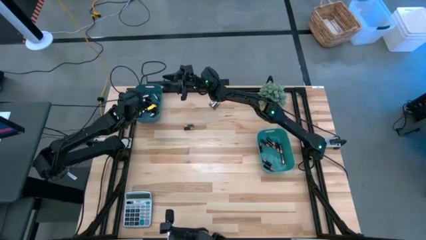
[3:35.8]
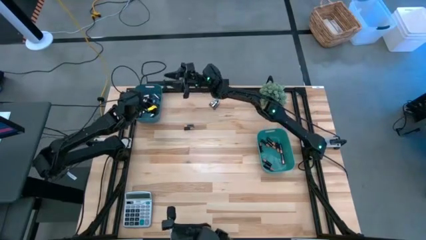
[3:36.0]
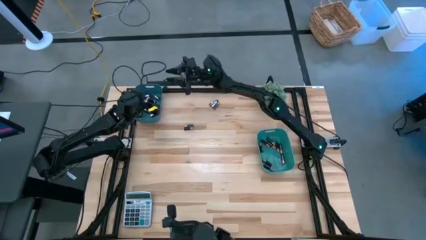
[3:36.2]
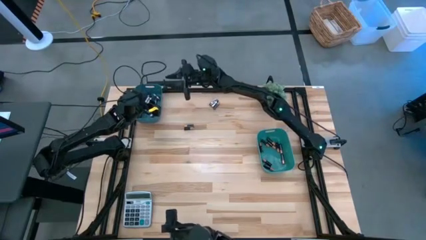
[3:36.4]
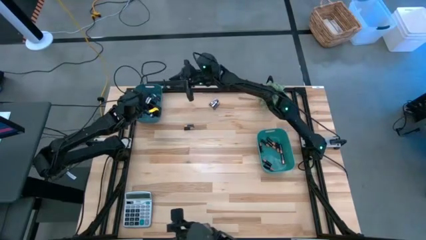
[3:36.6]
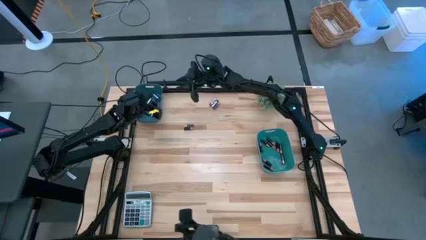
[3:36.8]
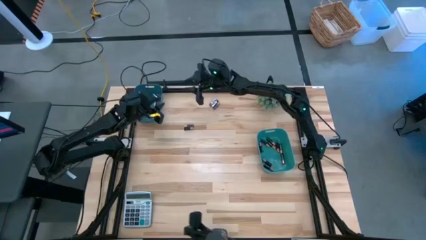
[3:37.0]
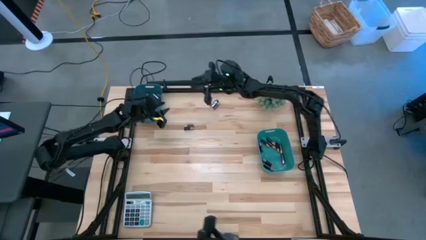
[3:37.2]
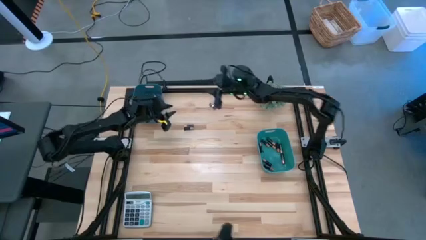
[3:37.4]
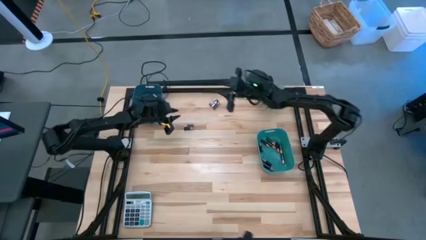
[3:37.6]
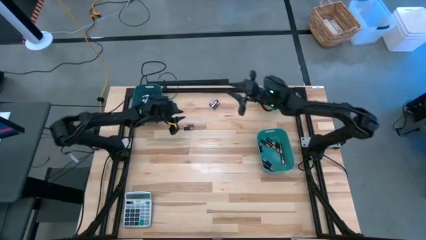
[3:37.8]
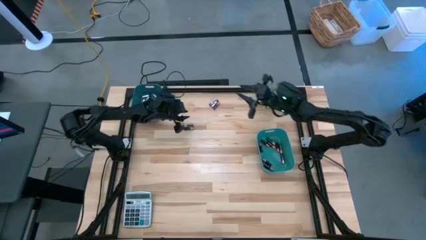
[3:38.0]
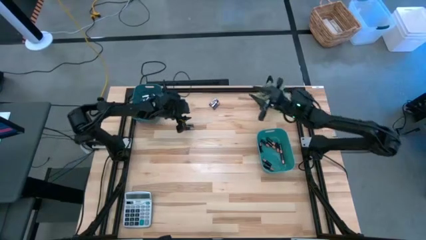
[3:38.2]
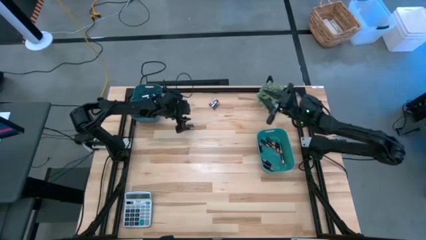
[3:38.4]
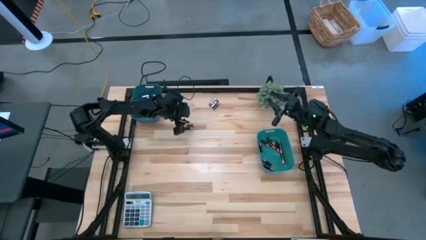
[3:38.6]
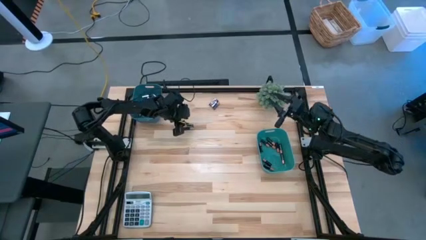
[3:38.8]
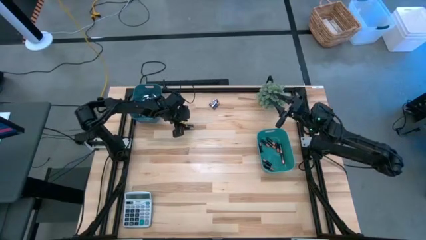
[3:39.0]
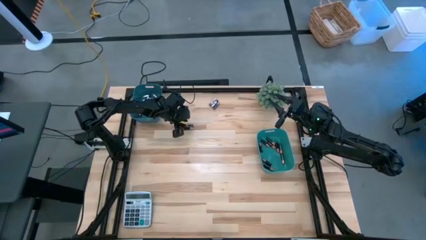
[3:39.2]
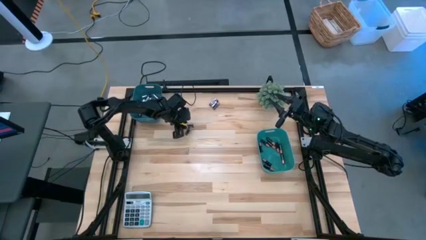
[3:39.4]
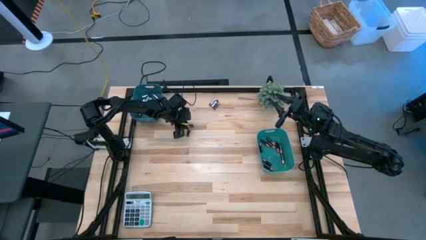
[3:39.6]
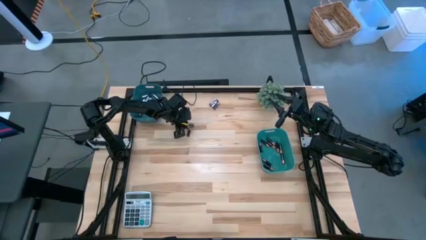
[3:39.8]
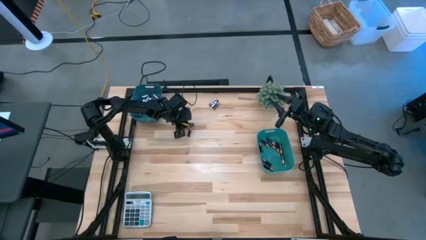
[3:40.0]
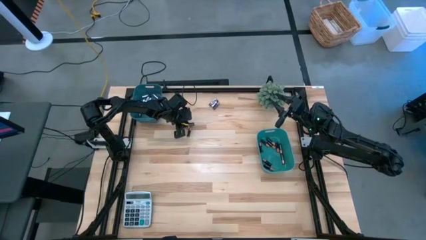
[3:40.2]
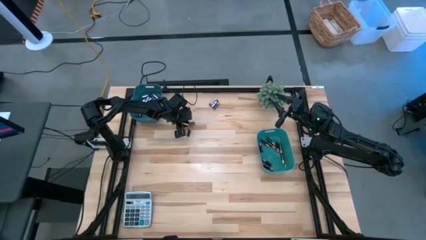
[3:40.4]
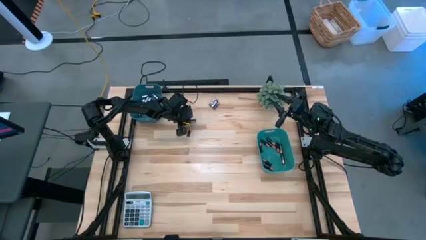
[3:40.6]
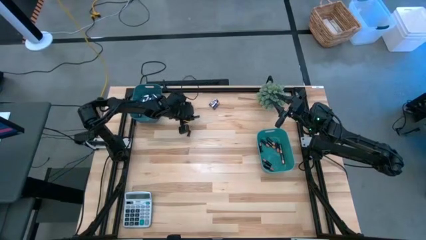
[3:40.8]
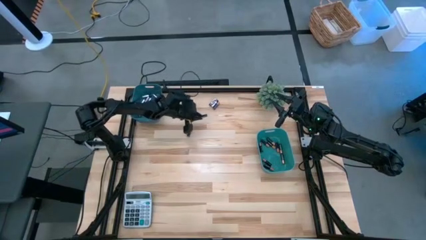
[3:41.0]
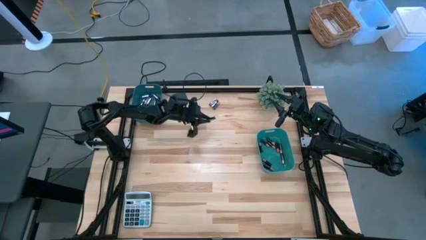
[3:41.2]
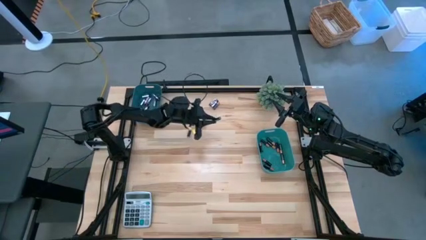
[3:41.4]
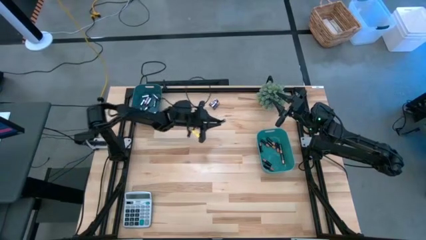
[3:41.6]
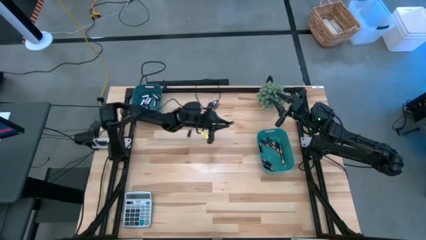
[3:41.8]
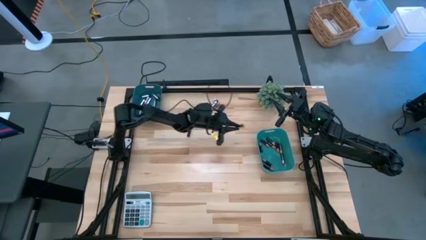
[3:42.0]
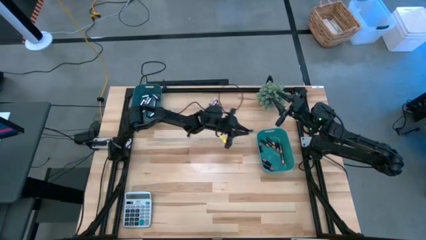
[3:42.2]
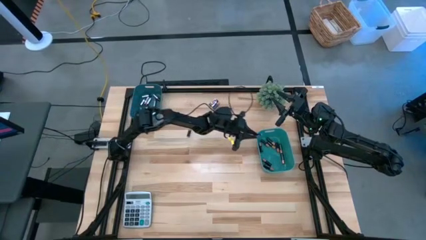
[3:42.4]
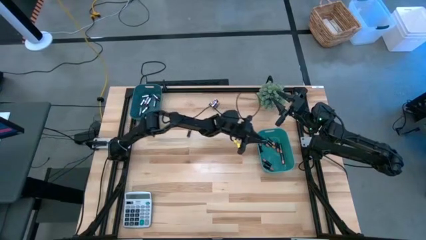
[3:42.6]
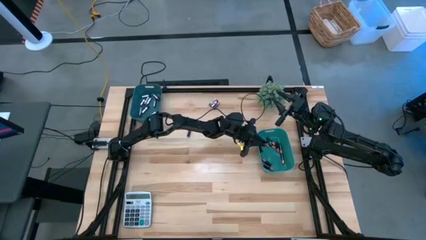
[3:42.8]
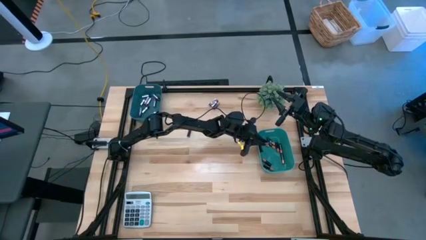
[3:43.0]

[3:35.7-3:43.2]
Task: Sort batteries
Put the brown-block battery into the green bin

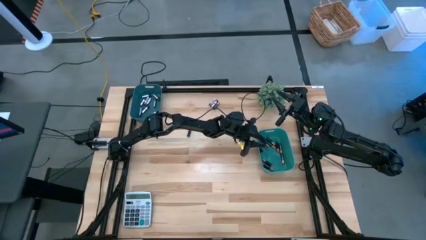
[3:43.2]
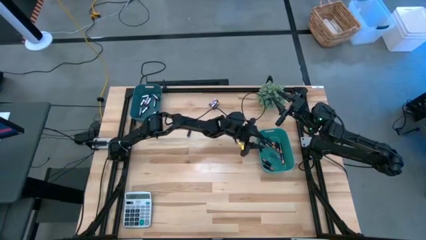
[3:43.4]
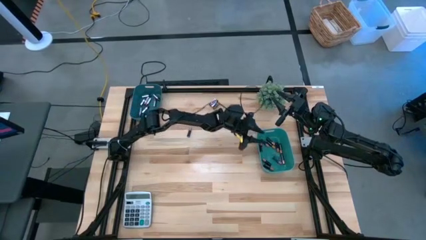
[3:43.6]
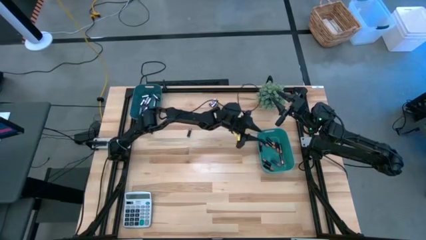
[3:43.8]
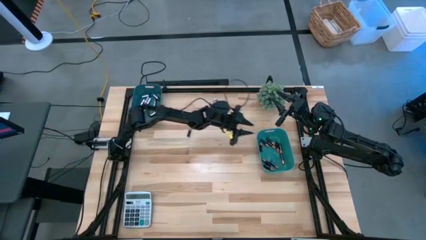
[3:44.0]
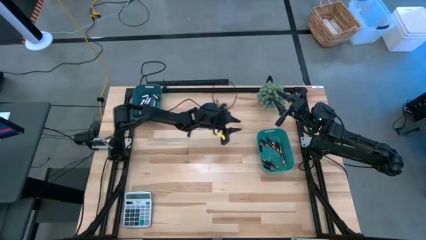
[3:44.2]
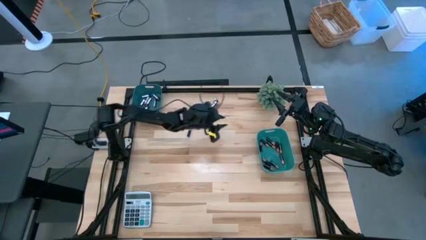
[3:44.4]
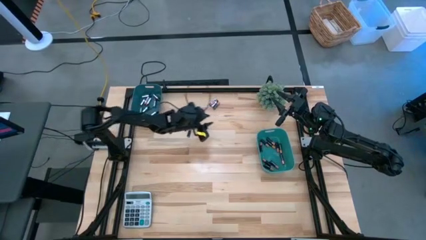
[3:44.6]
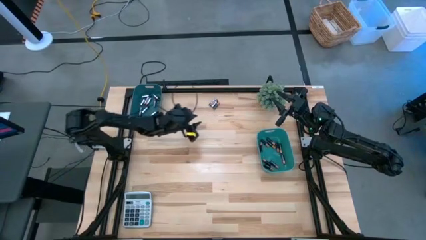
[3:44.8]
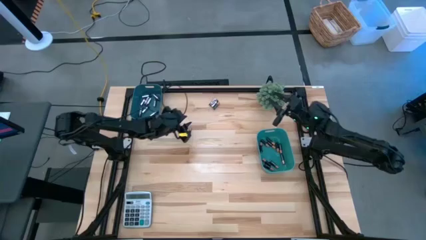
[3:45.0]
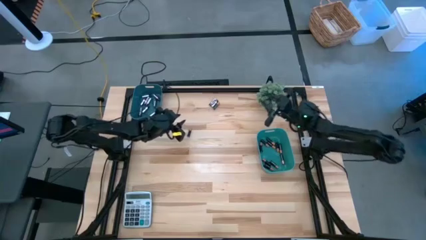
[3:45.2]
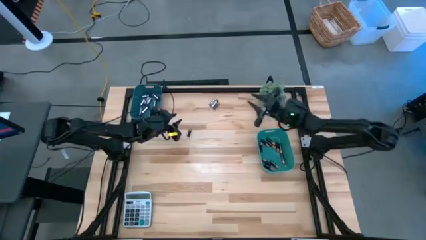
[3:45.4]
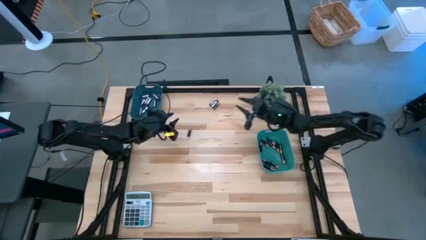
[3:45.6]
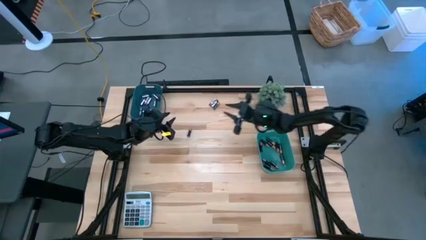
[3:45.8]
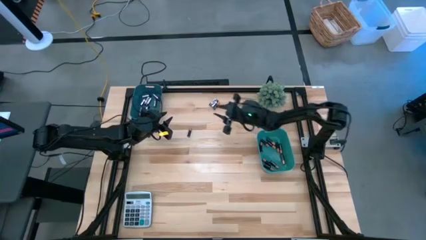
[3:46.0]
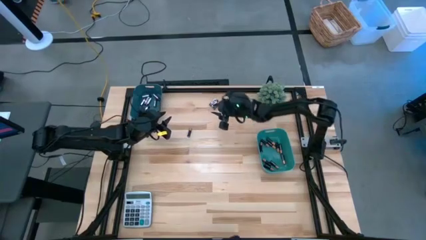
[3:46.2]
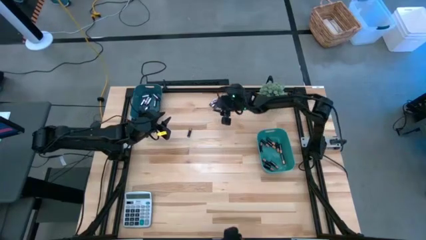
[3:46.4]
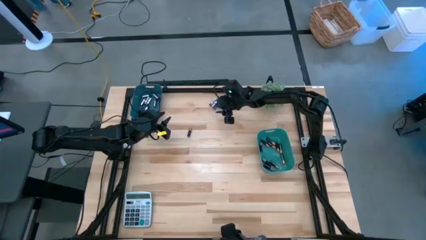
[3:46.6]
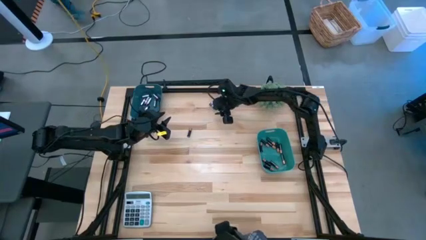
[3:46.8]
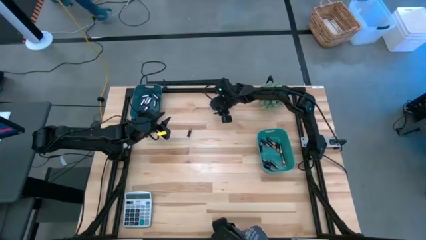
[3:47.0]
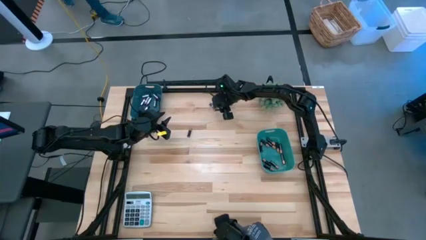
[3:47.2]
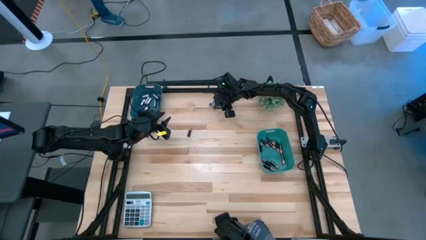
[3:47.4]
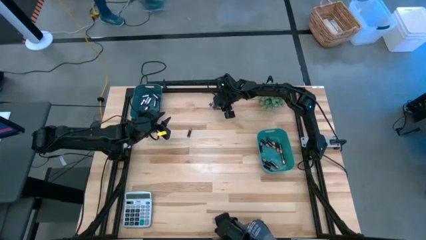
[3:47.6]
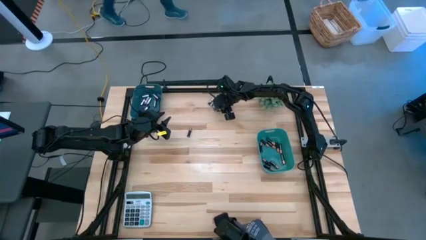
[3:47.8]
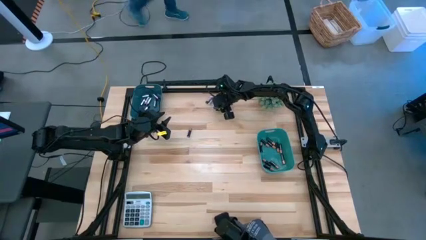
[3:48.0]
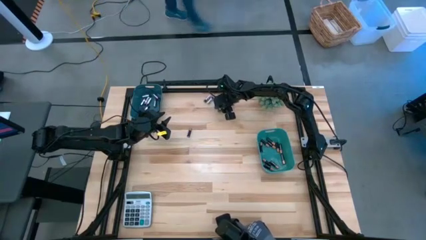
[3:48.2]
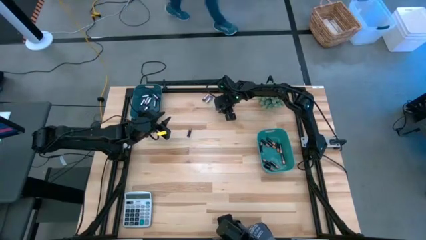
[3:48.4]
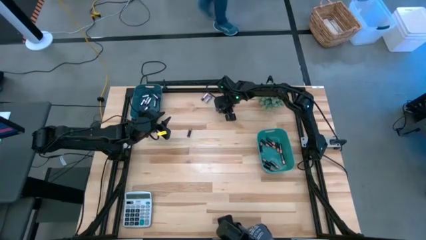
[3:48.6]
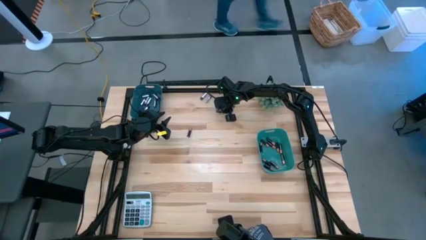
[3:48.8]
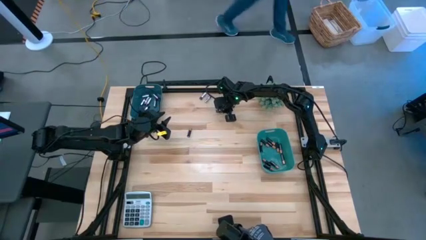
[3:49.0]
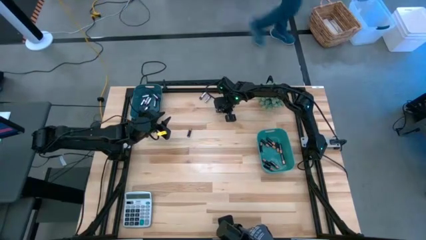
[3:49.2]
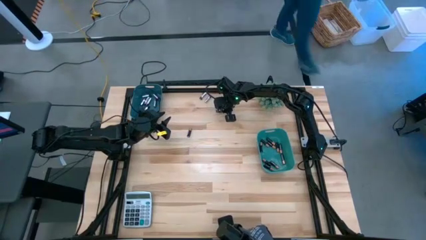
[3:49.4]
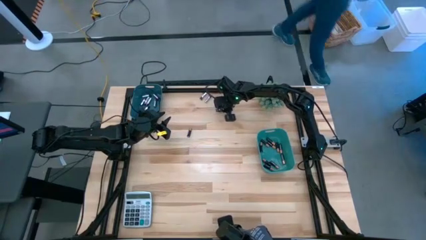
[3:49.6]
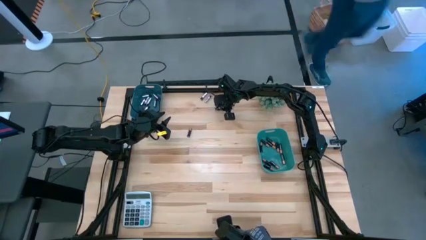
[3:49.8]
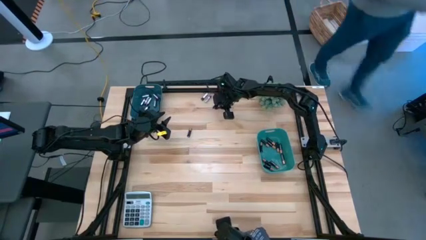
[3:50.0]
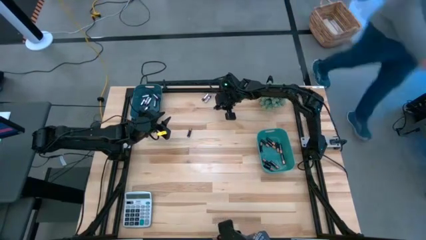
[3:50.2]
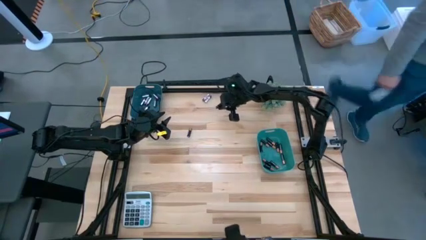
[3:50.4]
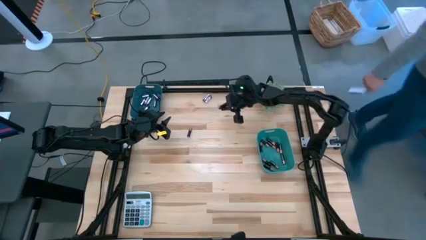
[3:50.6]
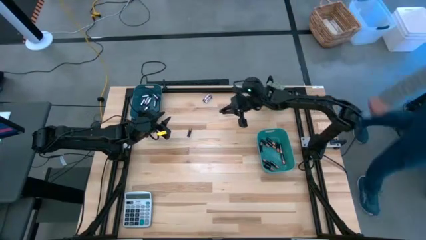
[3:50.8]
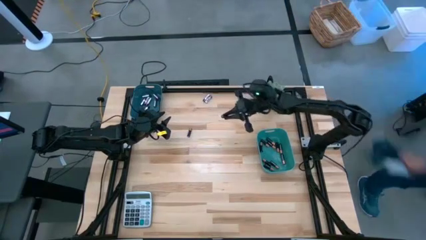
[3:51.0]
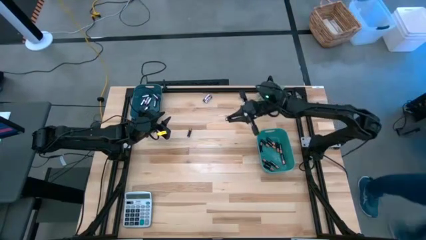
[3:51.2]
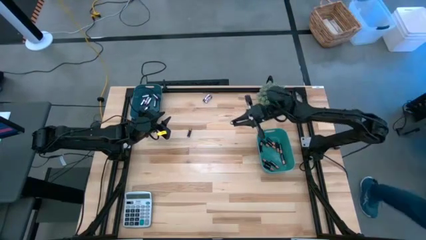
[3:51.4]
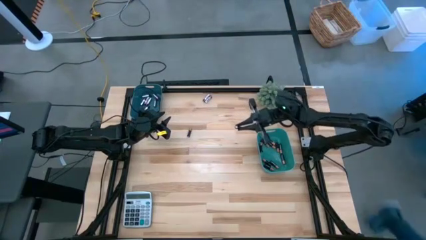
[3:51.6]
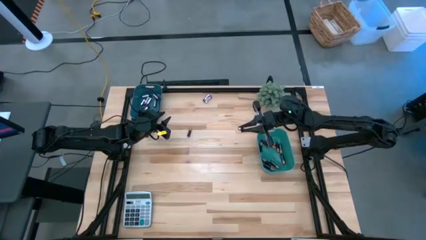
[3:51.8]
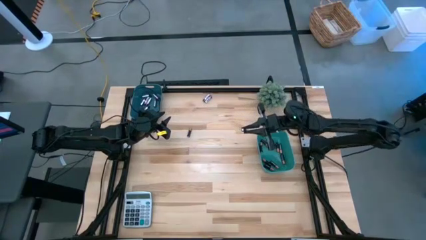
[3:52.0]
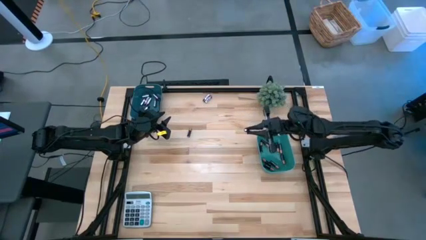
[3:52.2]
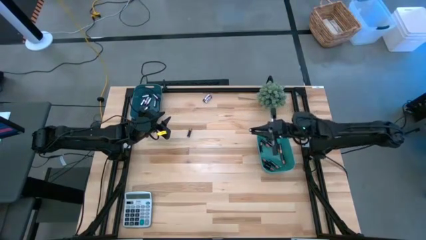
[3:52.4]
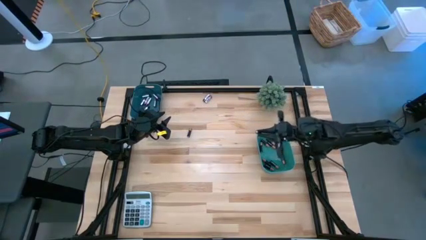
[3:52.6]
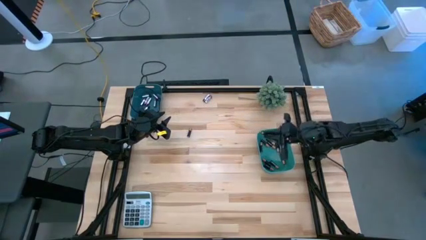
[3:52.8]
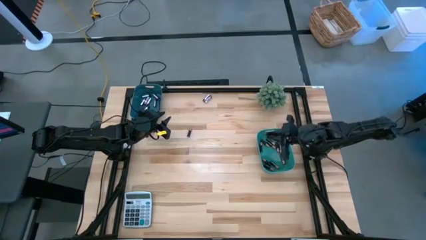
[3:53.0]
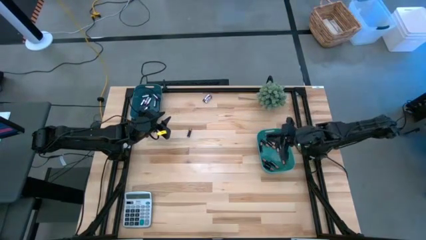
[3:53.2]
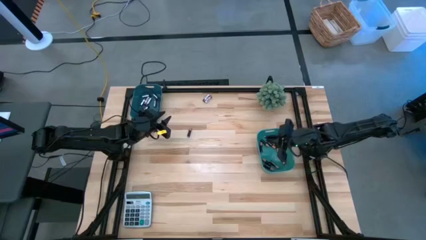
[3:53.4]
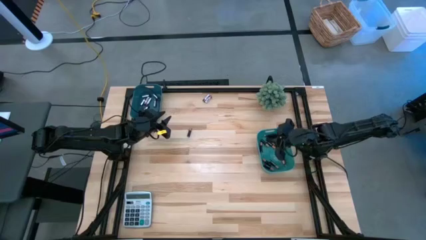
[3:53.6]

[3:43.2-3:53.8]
Put the brown-block battery into the green bin
